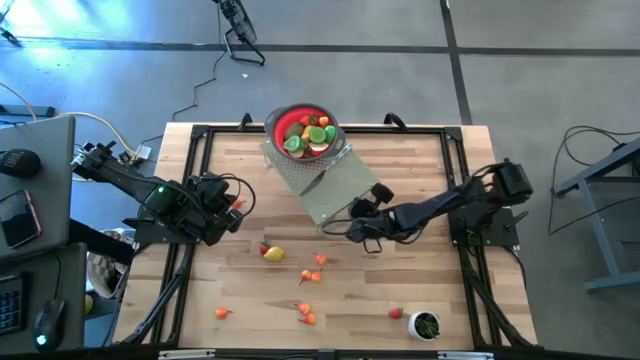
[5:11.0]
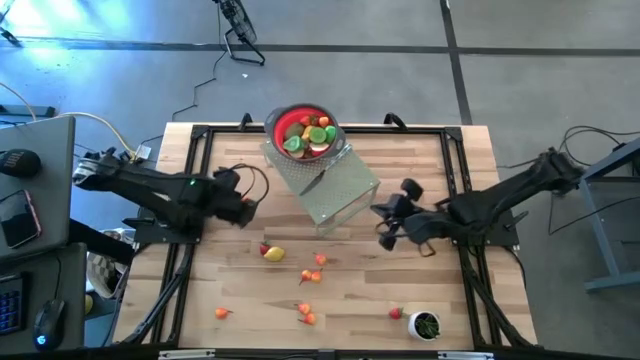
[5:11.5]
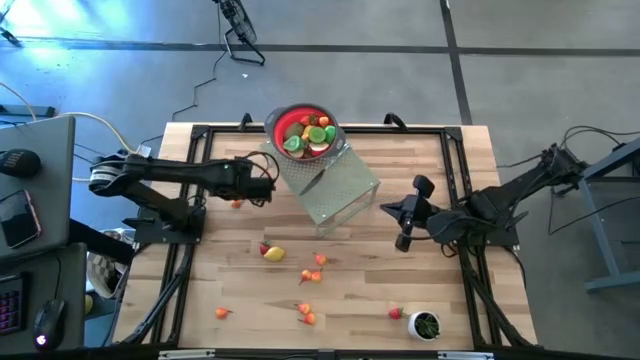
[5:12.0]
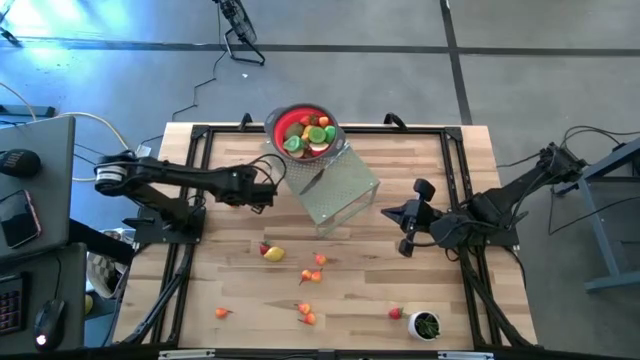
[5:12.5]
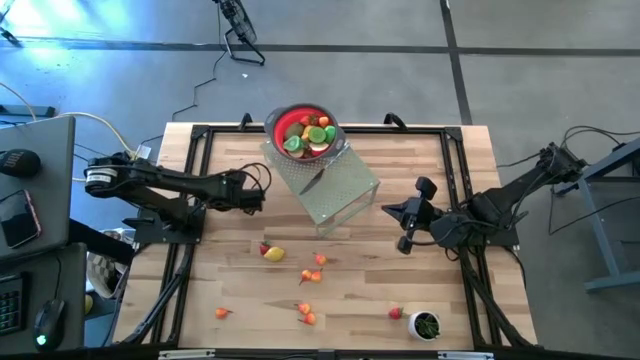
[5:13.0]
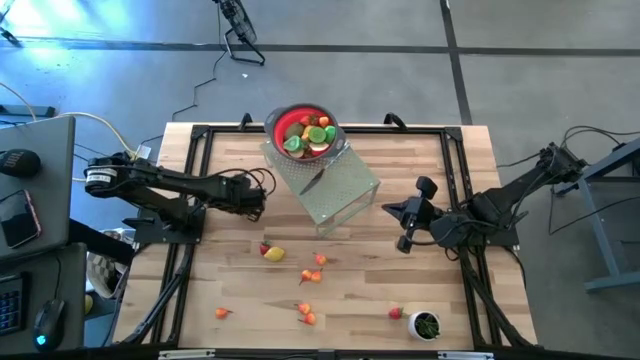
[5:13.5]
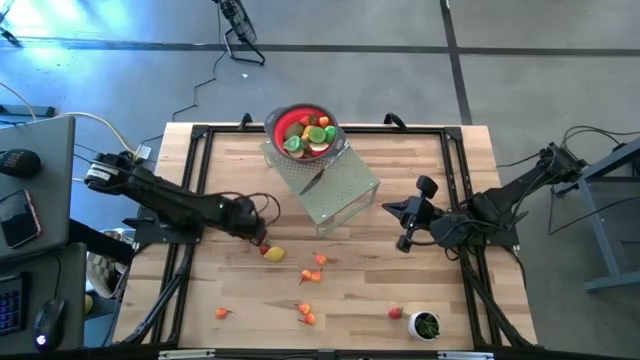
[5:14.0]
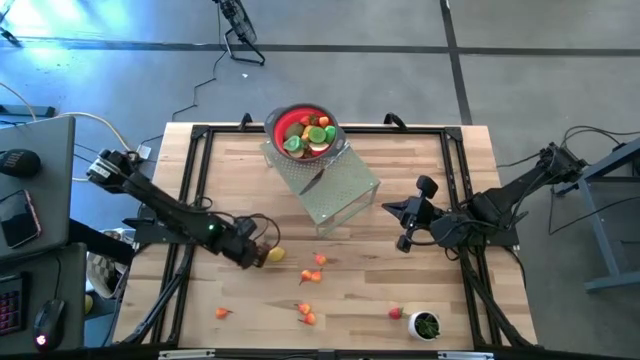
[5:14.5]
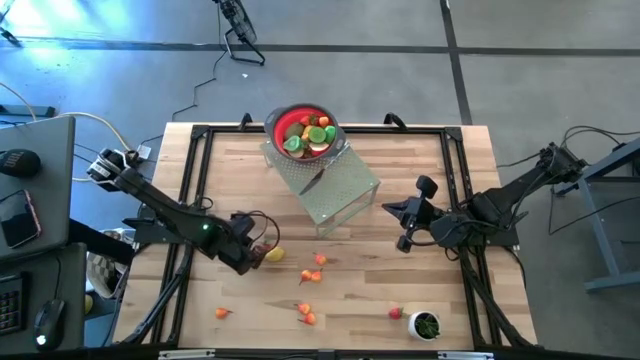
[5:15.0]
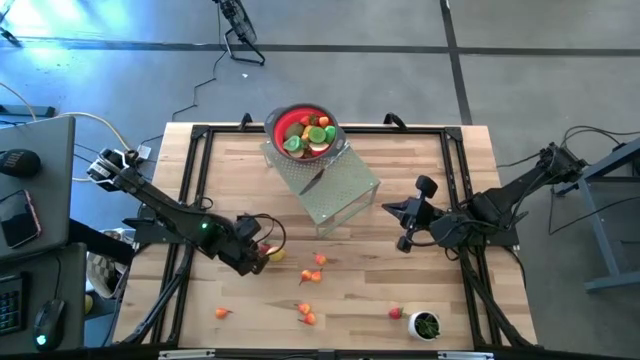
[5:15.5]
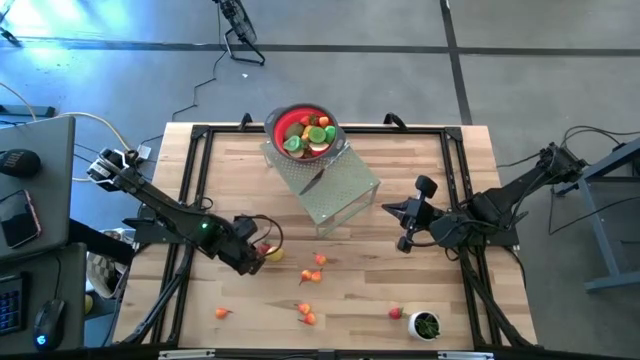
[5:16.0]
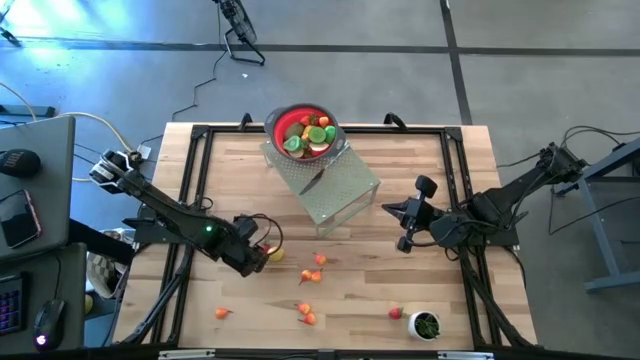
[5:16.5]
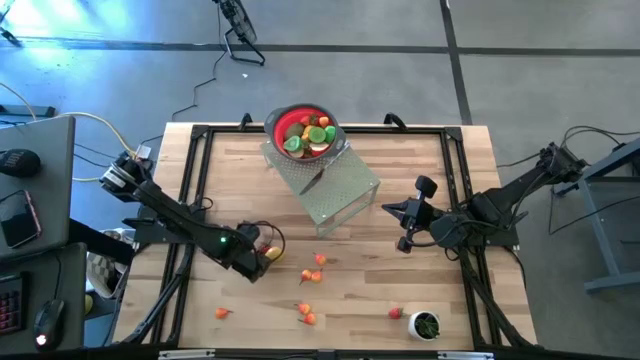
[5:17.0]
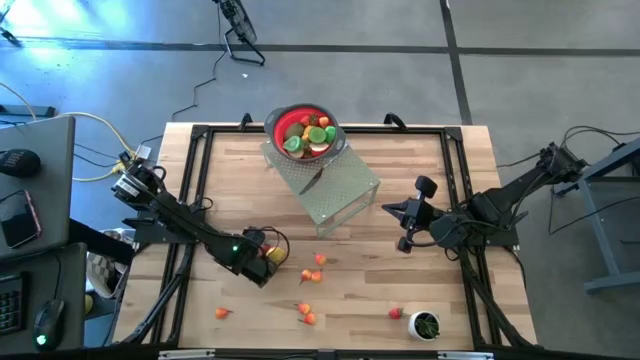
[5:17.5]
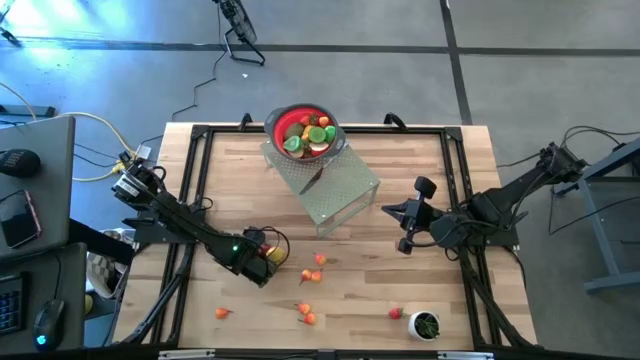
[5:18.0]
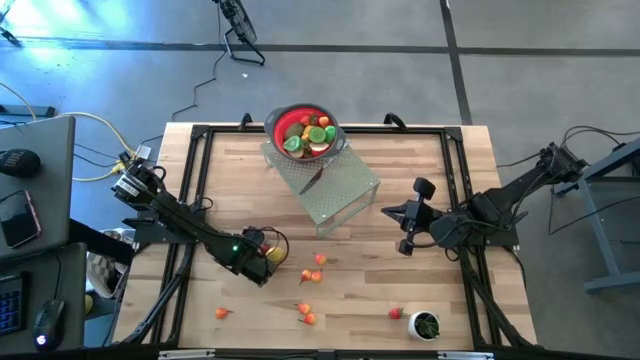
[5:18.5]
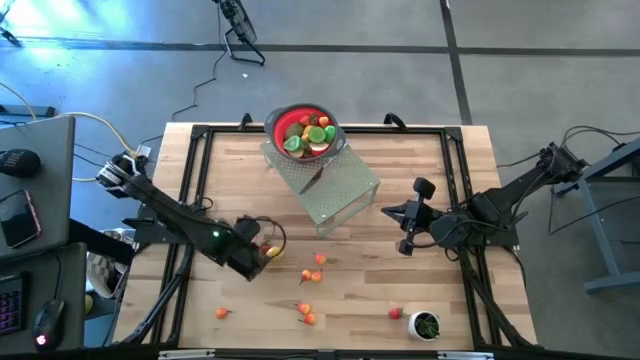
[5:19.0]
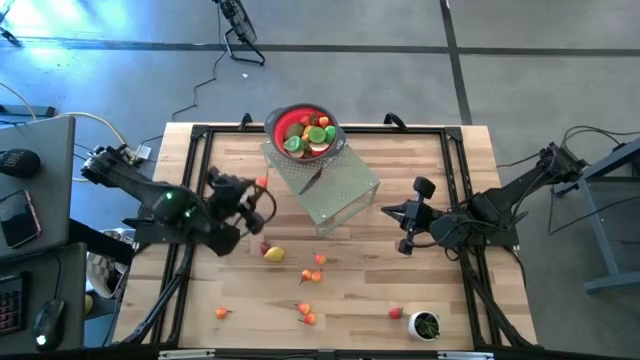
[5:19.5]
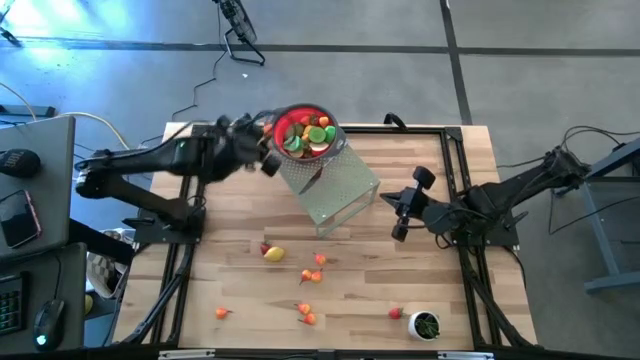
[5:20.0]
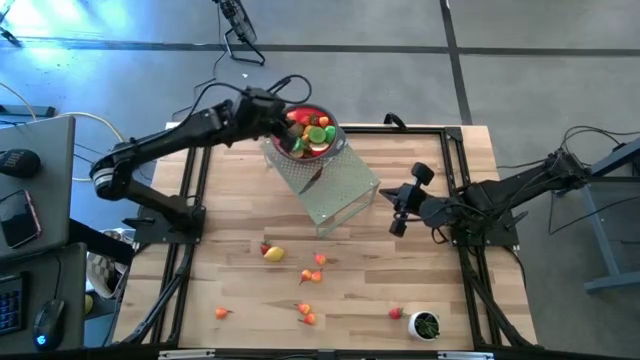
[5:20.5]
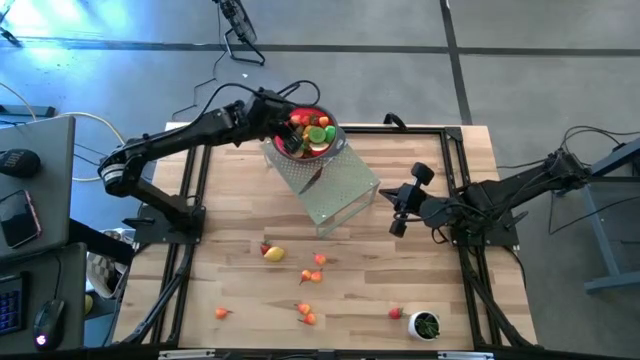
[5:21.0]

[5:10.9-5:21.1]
Task: Pick & Place Fruit
Put the orange pear into the red strainer on the shelf

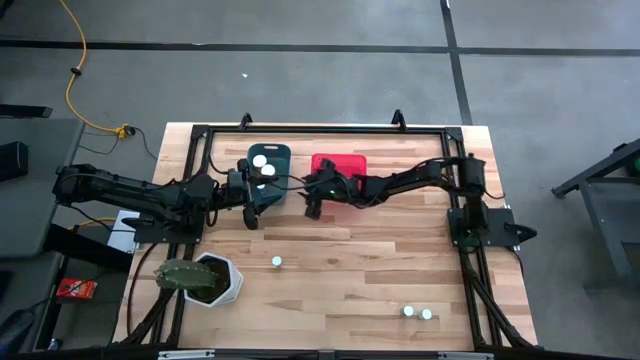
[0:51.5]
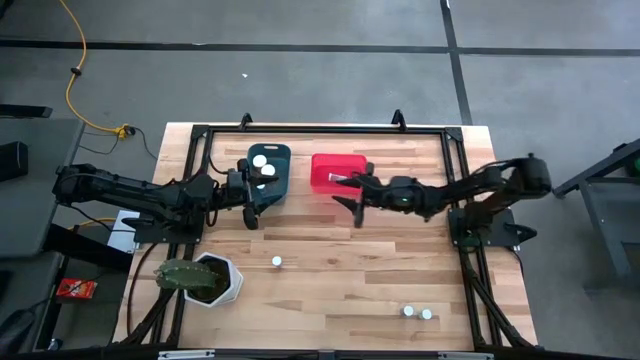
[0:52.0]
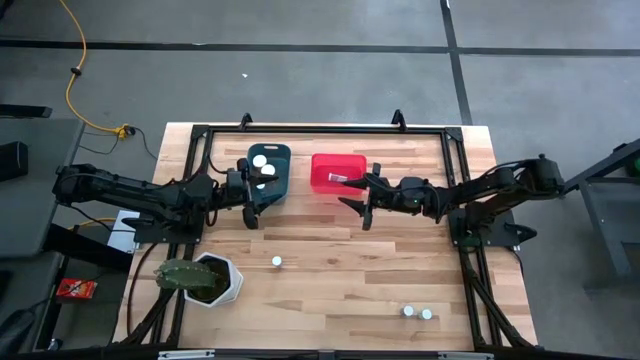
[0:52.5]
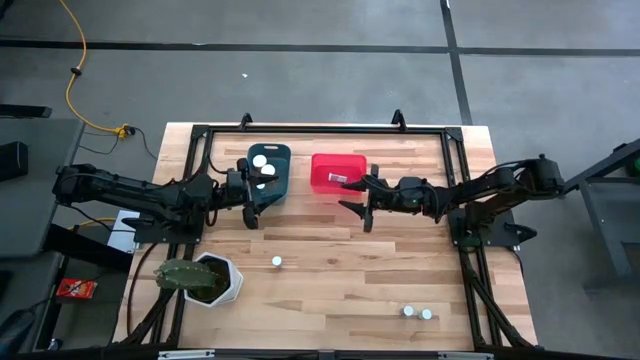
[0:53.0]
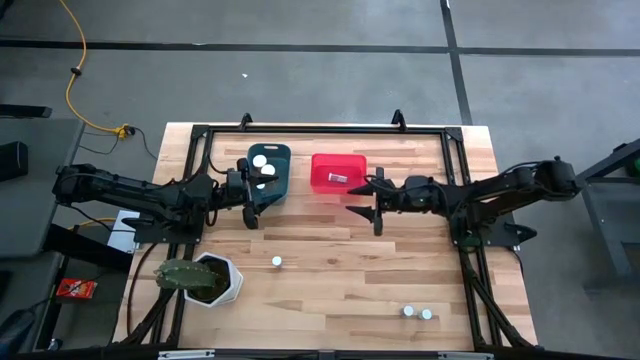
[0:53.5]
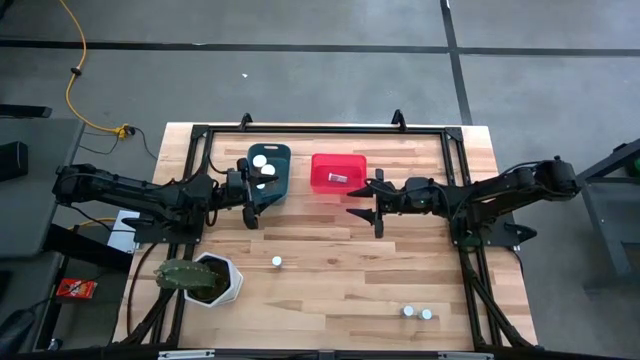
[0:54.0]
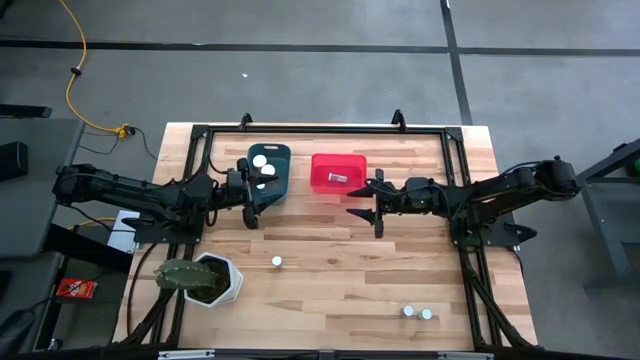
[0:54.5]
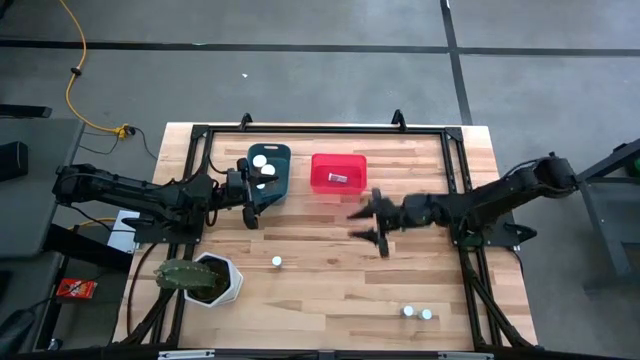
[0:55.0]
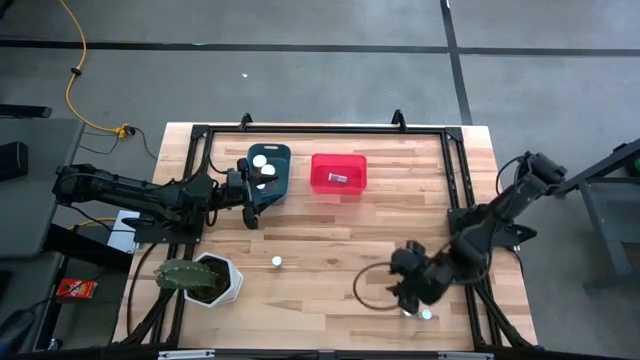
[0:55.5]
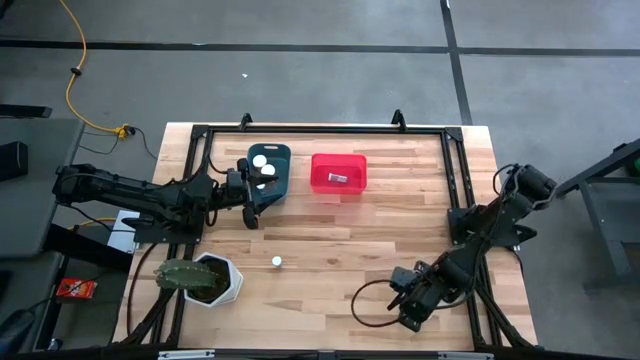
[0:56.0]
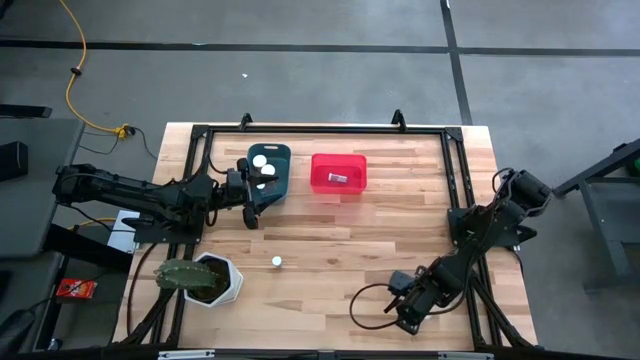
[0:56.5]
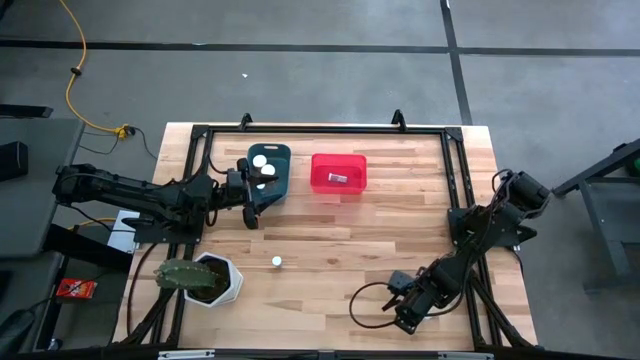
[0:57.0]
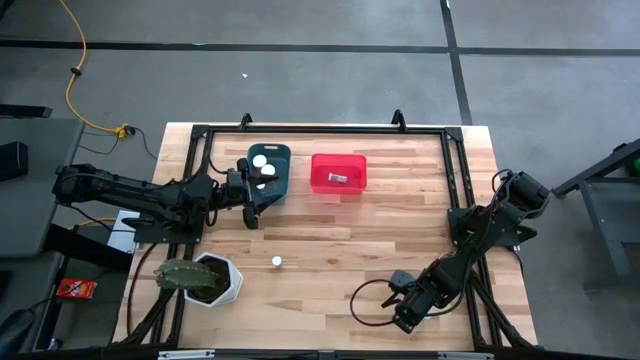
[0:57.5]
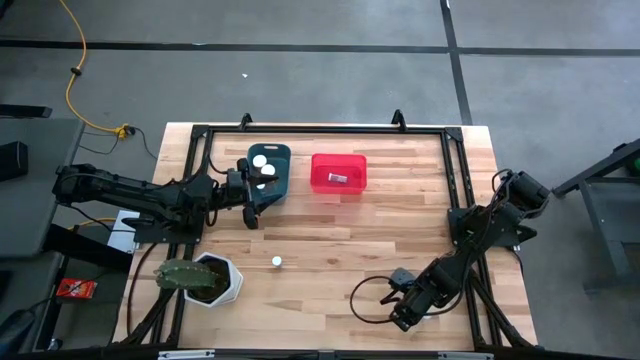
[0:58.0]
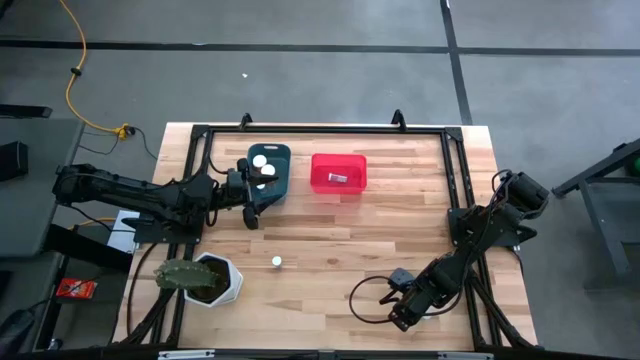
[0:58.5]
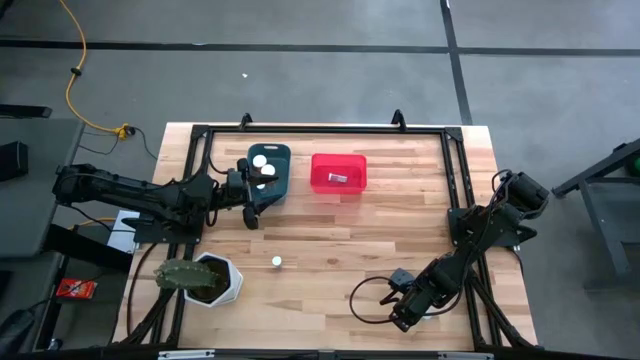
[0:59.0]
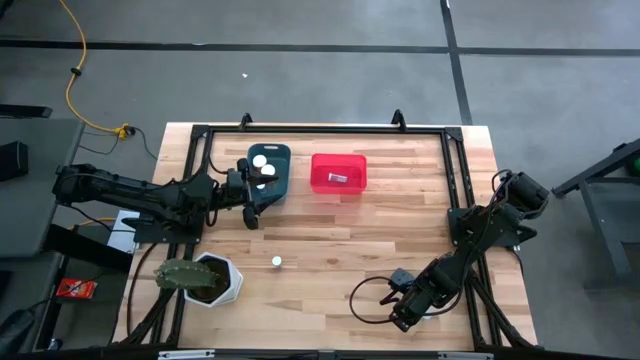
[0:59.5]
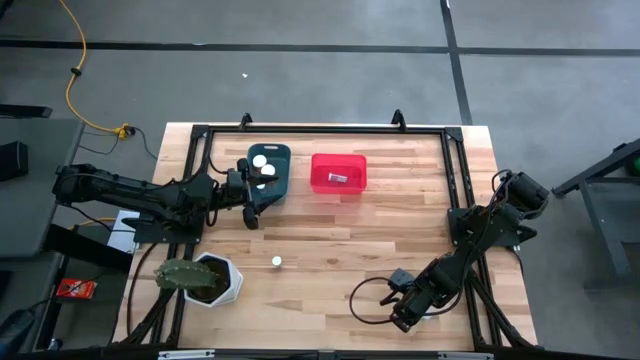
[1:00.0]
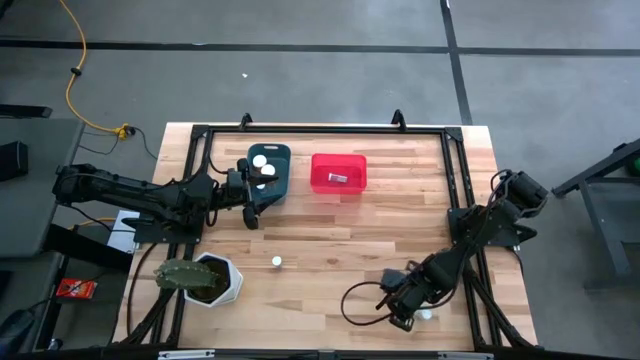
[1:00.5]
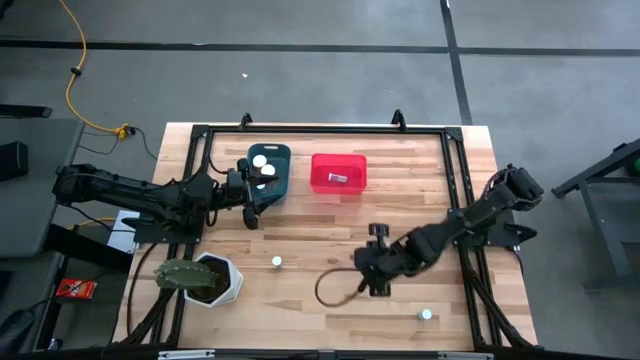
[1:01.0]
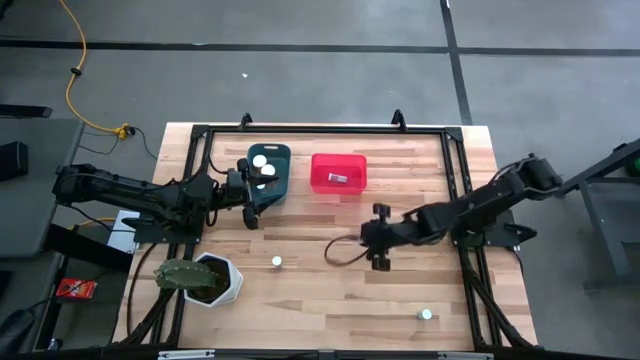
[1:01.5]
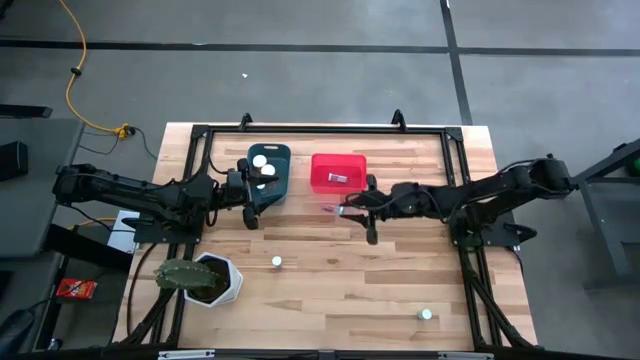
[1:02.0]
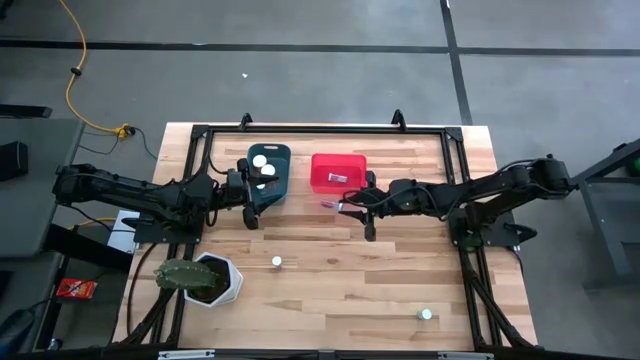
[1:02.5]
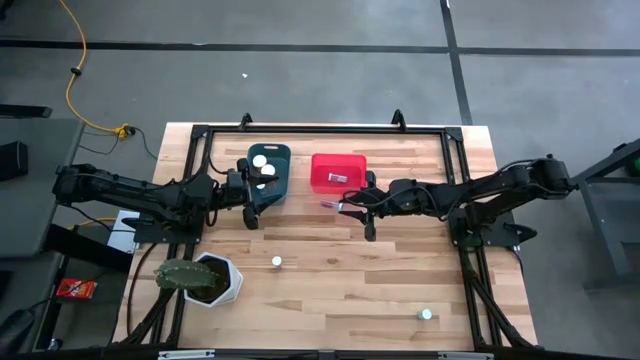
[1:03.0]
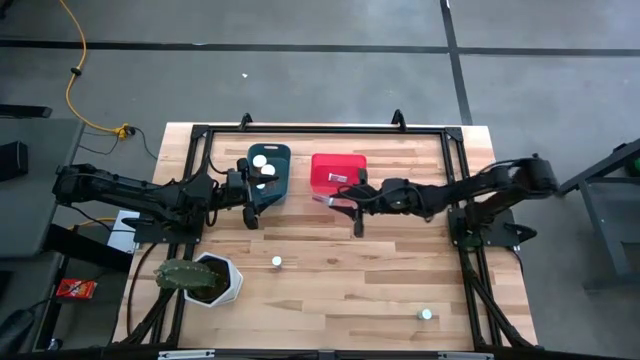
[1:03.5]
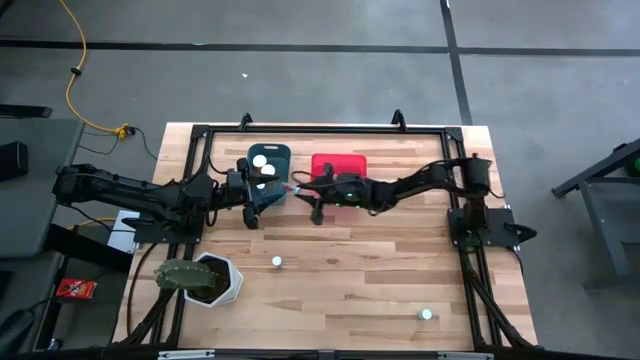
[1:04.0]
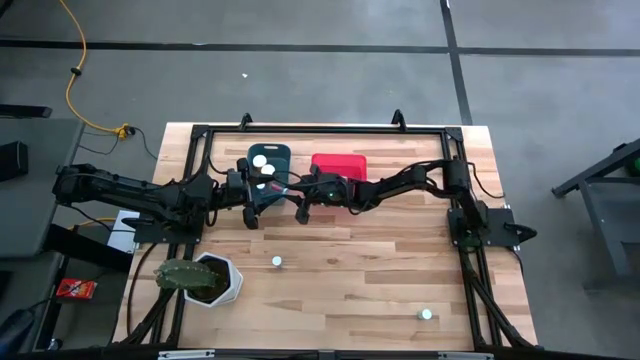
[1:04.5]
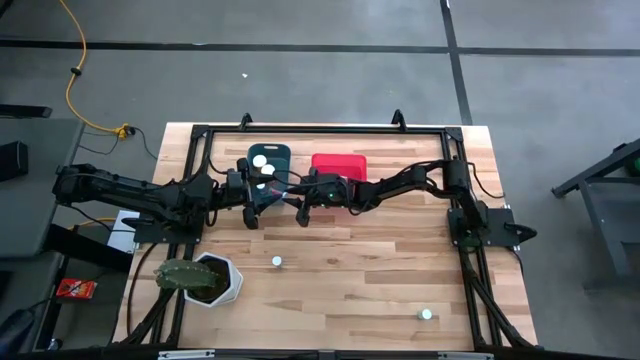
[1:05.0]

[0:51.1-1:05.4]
Task: Pick and place medicine bottles into bin by pill shape (circle, oval)
Put the right blue capsule bottle into the blue bin
